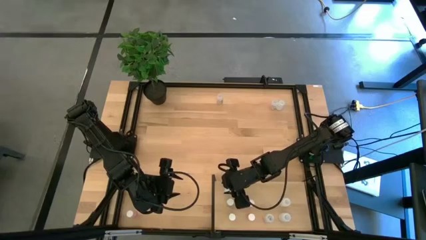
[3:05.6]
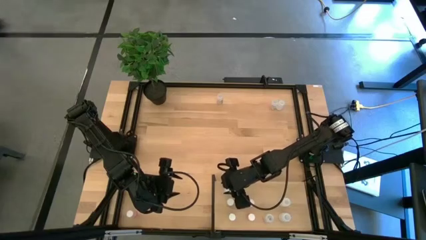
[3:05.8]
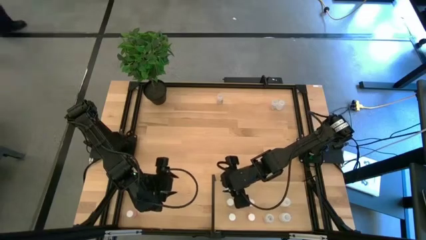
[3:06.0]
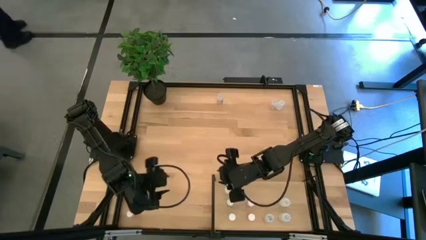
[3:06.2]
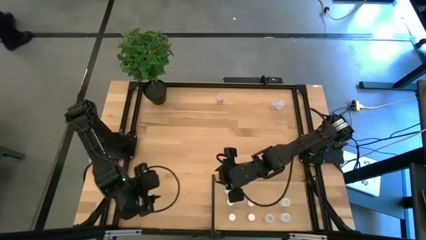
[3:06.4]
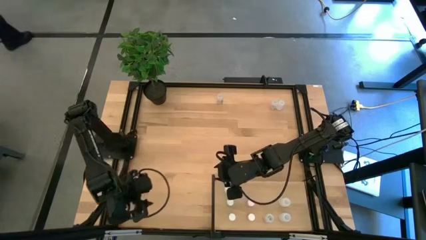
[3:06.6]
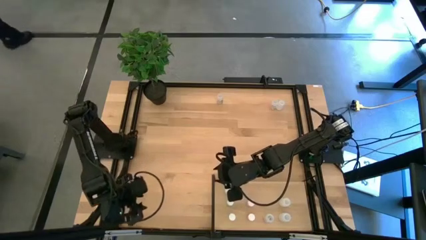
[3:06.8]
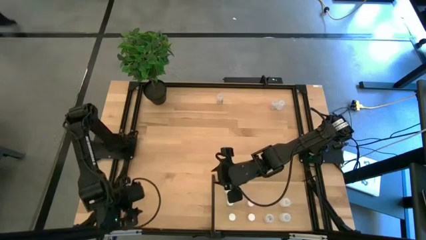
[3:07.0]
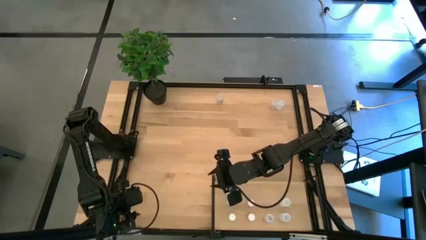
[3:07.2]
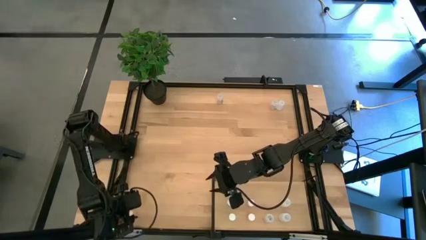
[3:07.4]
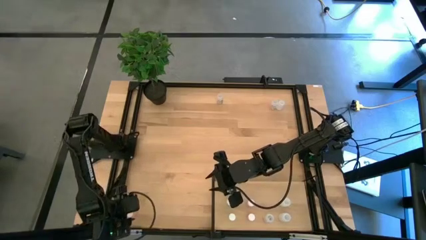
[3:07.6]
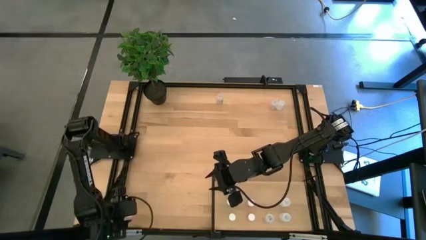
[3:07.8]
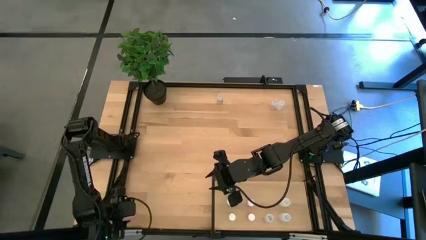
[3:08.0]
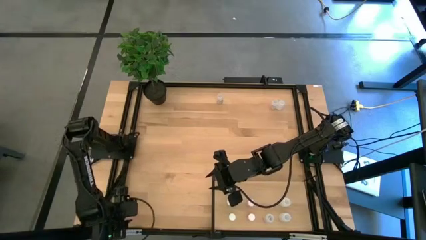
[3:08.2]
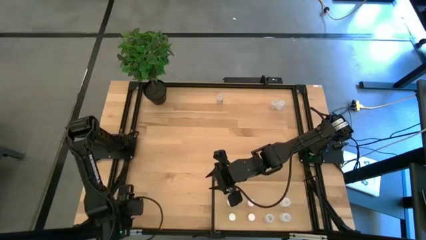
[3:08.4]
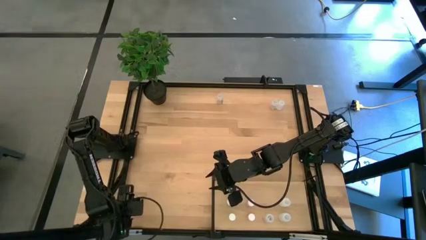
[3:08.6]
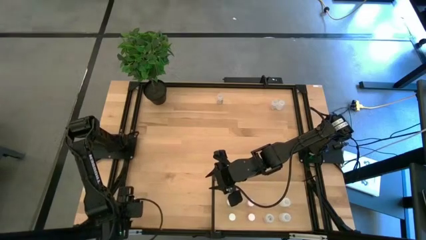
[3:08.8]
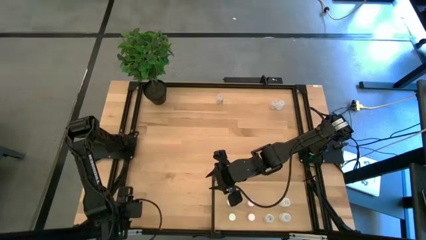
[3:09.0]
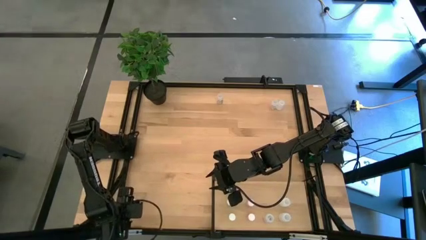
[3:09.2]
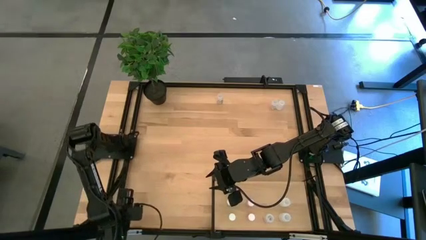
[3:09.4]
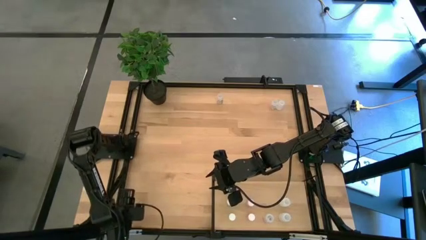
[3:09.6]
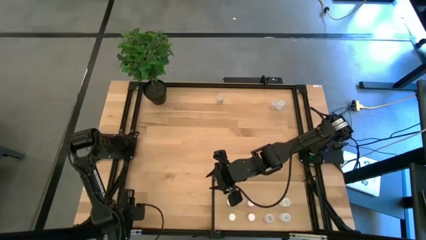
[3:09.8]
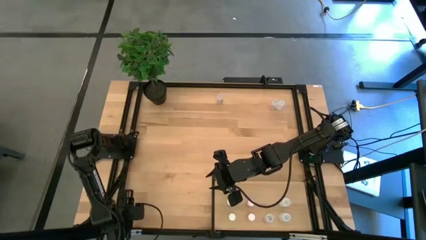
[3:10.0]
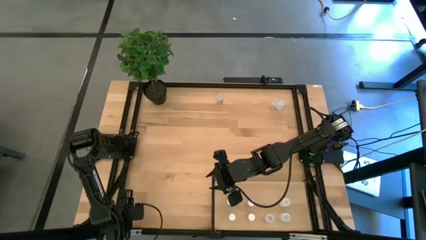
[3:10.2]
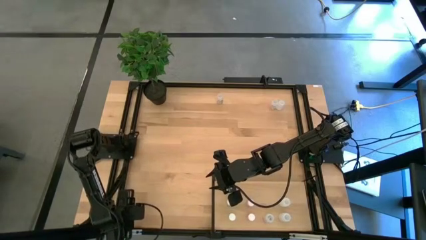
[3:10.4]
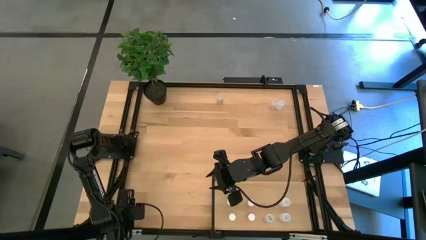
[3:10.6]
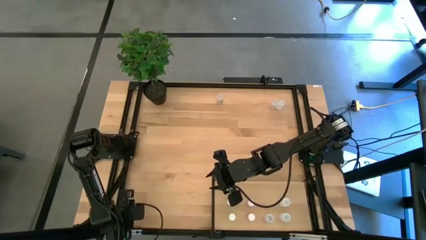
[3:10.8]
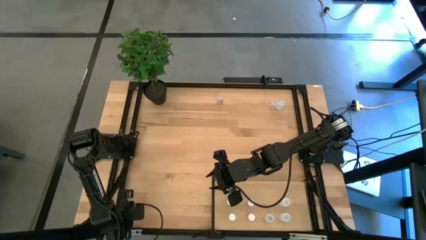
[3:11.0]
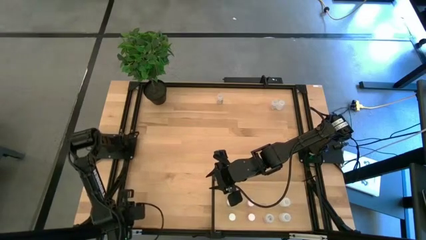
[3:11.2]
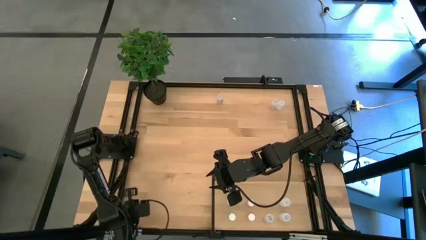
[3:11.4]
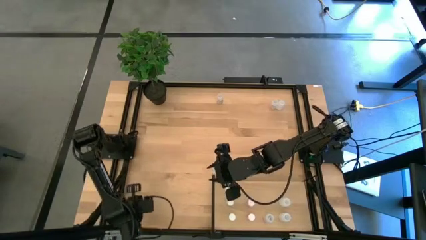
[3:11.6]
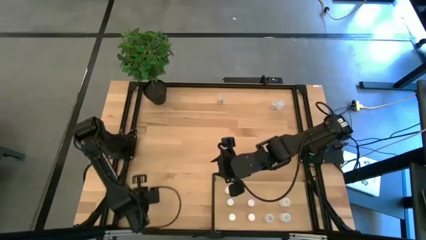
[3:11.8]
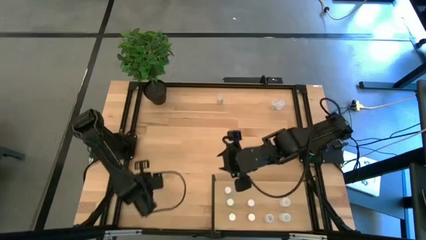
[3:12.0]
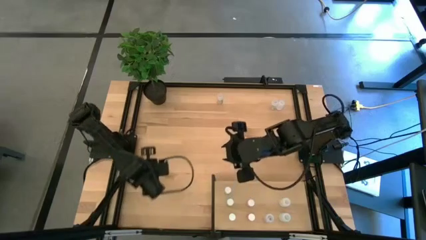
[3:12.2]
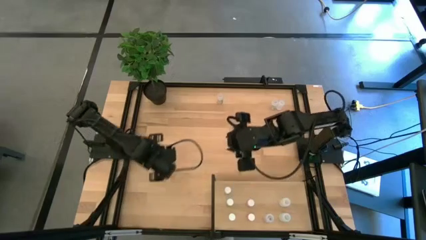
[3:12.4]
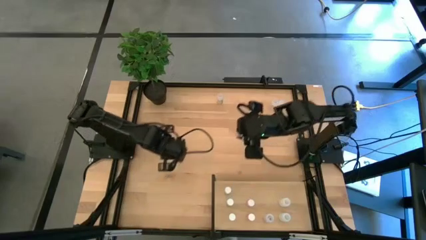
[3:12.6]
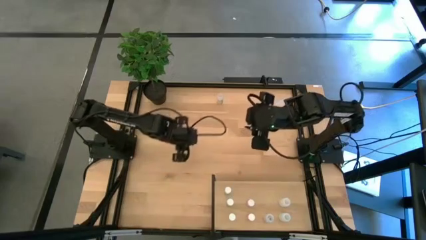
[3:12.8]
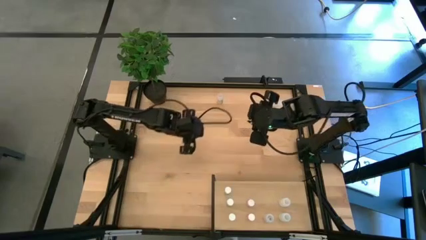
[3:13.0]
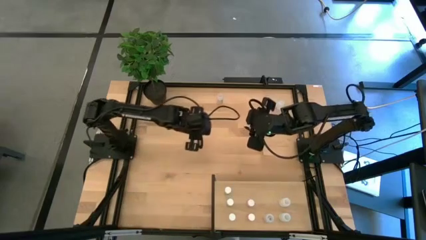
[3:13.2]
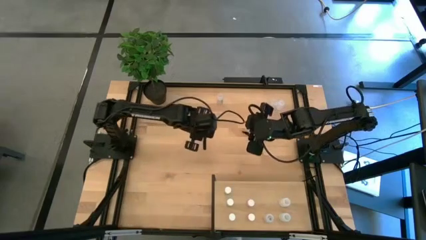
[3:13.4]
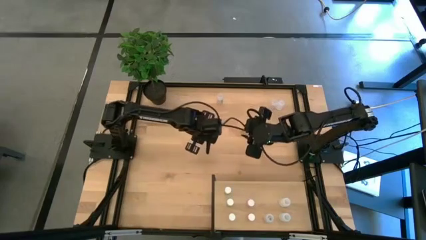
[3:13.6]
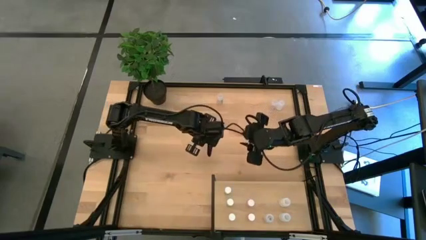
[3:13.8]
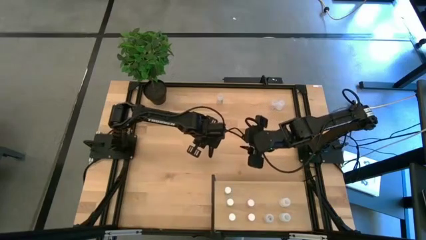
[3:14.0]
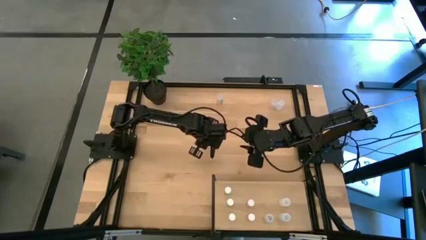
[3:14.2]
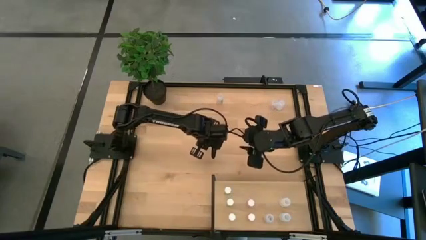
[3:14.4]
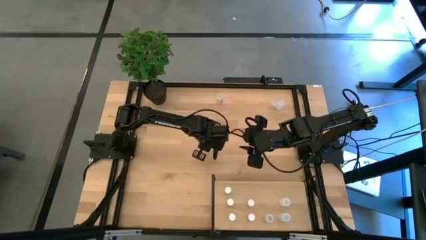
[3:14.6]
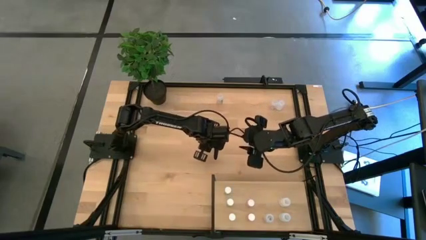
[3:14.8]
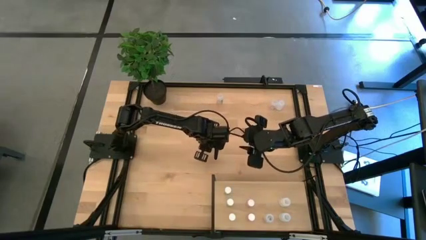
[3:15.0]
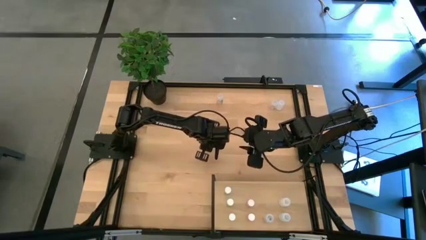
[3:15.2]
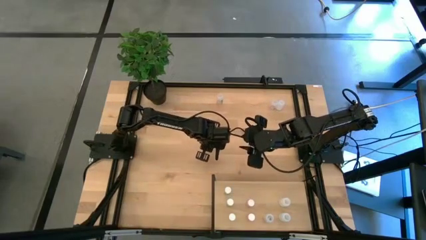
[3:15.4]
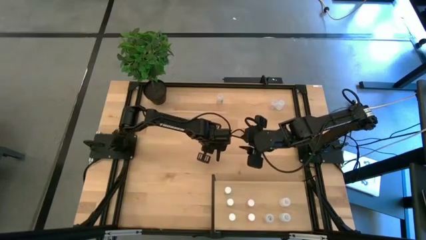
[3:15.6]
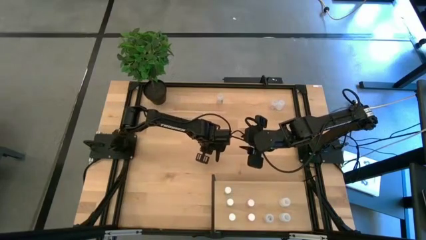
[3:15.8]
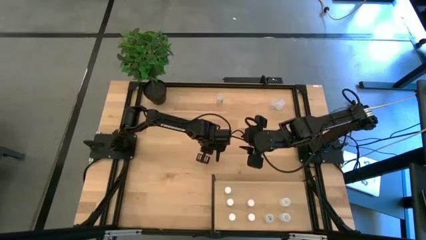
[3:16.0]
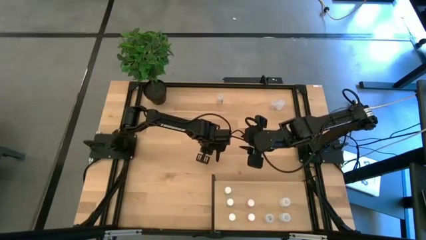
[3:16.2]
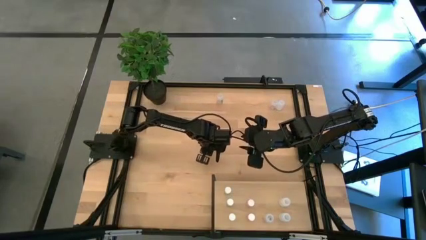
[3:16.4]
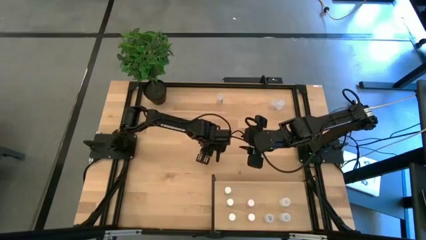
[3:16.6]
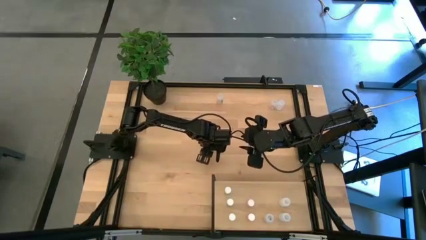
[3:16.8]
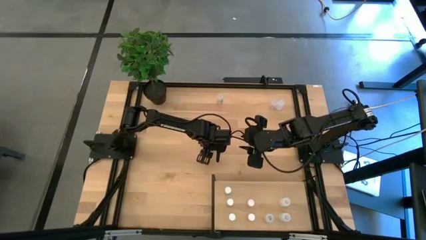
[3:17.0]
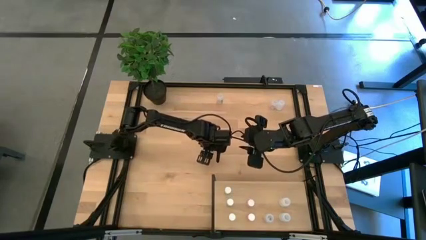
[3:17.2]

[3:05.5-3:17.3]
Task: Pick and place medicine bottles onto shelf by color
Put the pink pill bottle on the shelf aligned with the other pink pill bottles
